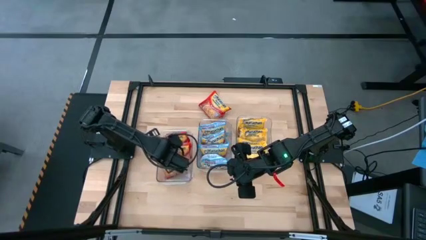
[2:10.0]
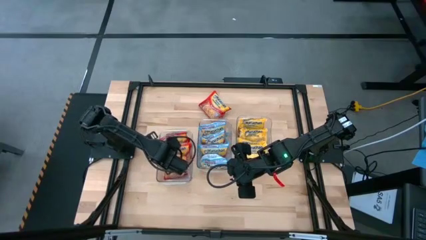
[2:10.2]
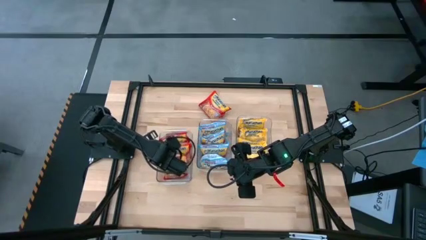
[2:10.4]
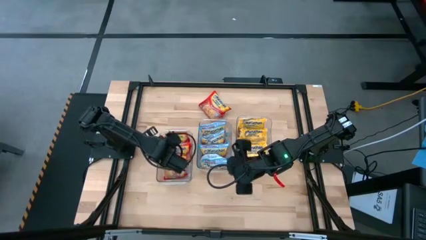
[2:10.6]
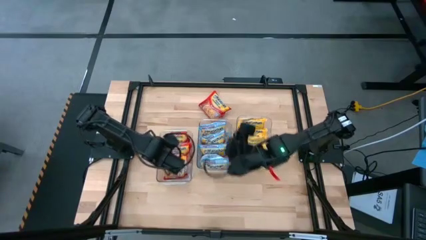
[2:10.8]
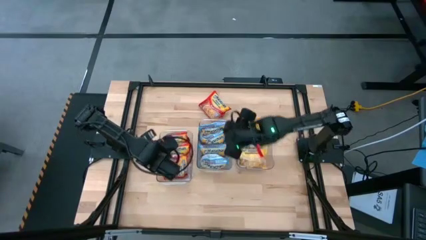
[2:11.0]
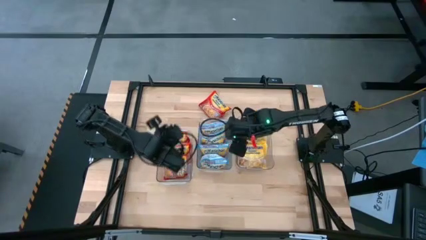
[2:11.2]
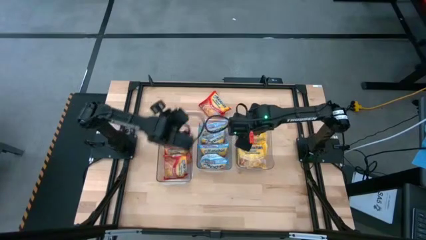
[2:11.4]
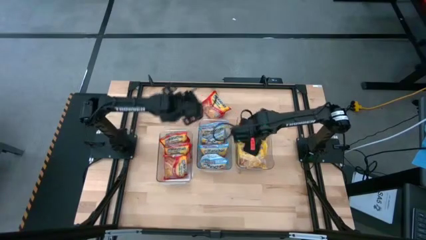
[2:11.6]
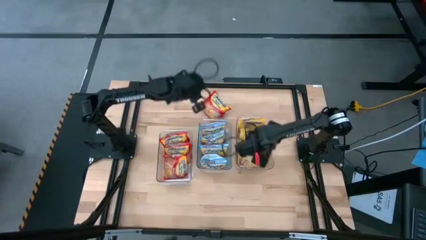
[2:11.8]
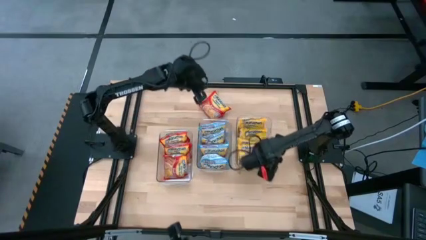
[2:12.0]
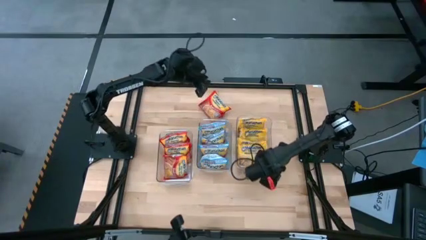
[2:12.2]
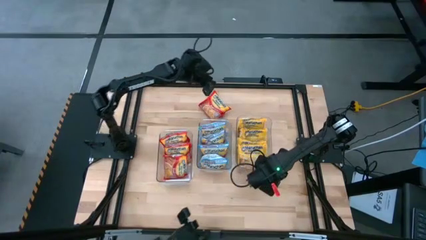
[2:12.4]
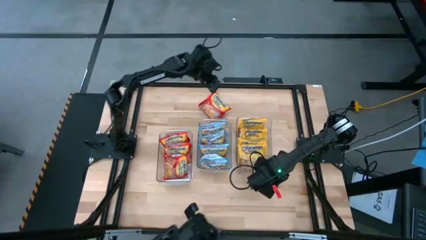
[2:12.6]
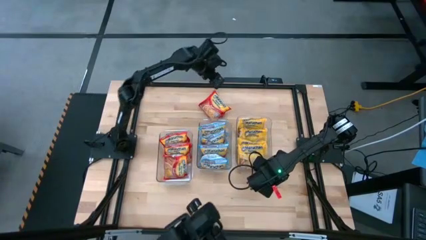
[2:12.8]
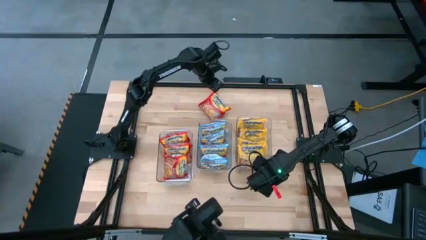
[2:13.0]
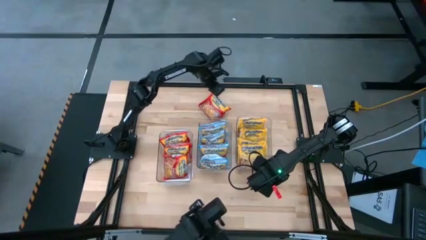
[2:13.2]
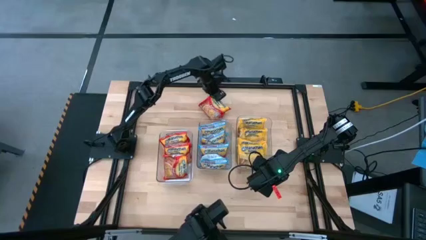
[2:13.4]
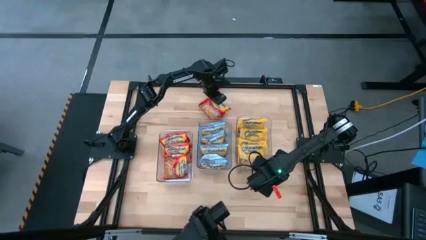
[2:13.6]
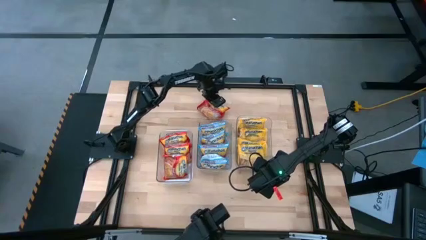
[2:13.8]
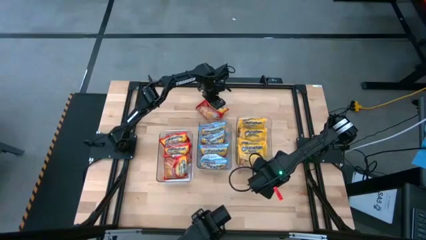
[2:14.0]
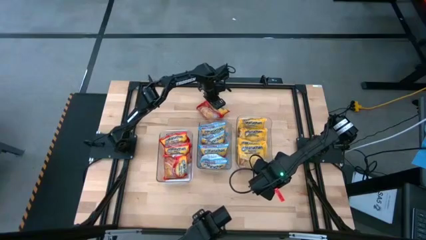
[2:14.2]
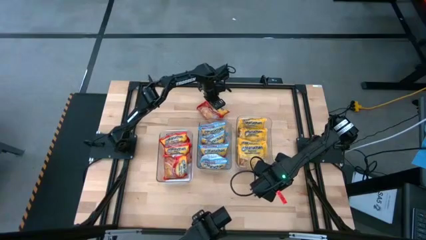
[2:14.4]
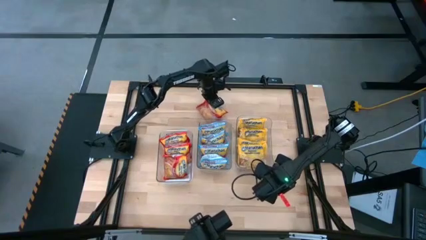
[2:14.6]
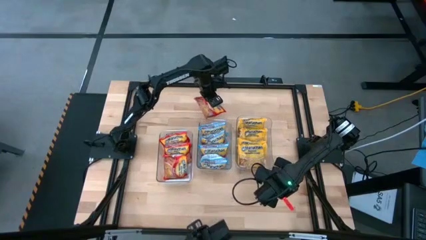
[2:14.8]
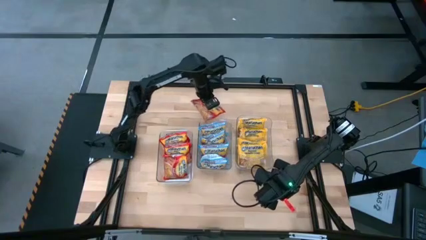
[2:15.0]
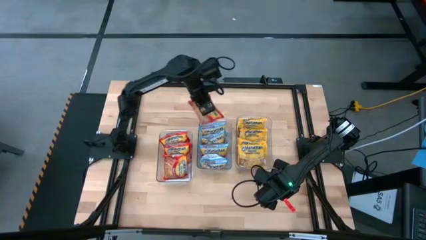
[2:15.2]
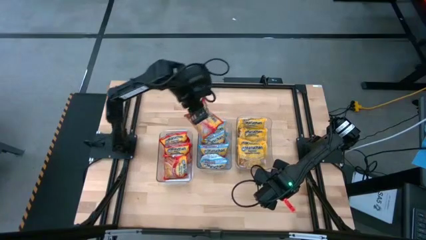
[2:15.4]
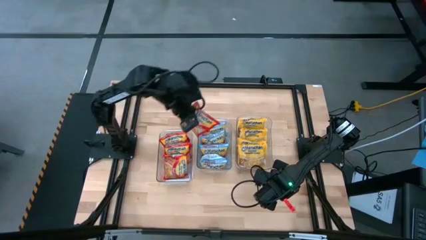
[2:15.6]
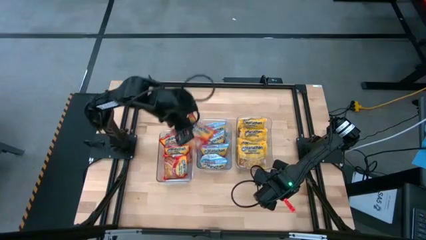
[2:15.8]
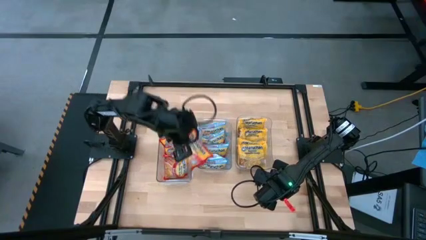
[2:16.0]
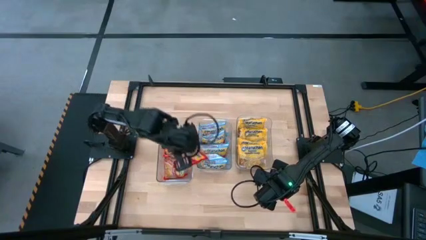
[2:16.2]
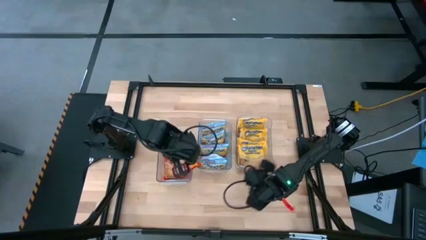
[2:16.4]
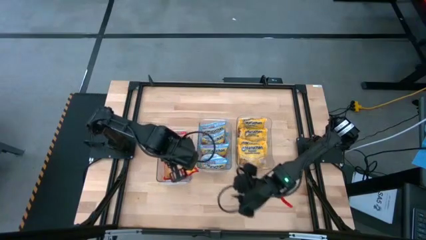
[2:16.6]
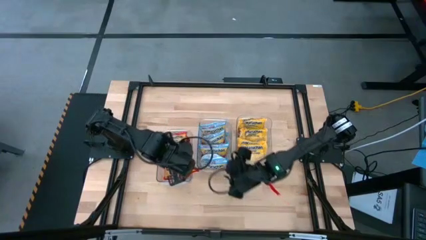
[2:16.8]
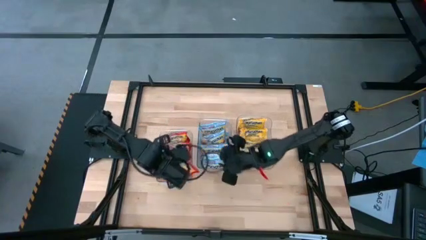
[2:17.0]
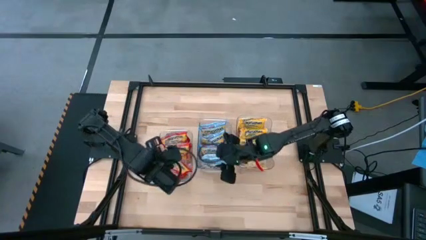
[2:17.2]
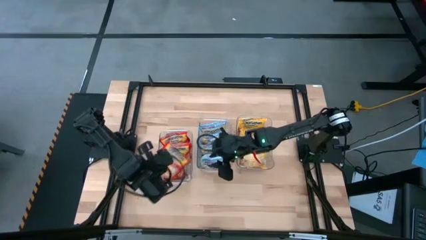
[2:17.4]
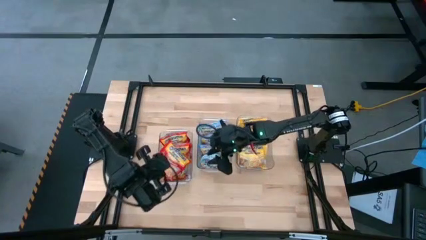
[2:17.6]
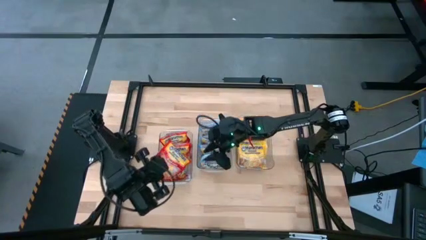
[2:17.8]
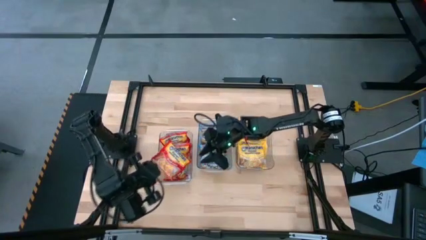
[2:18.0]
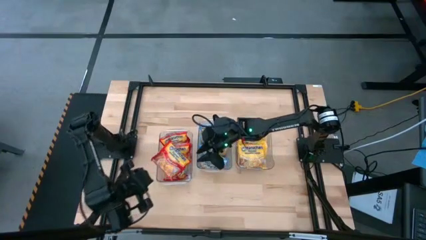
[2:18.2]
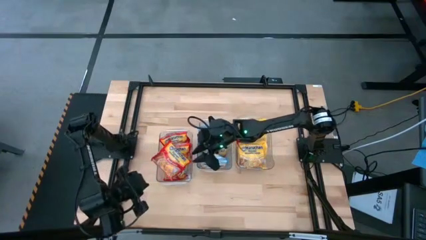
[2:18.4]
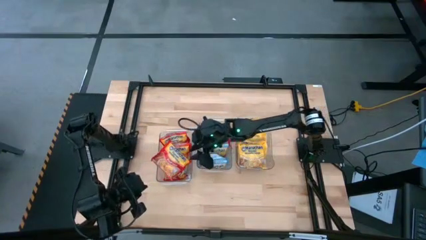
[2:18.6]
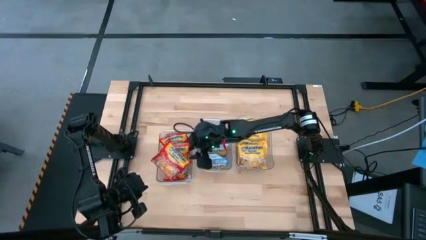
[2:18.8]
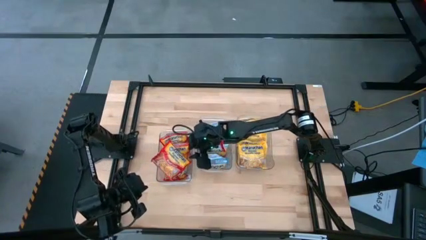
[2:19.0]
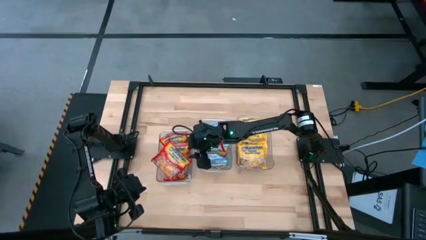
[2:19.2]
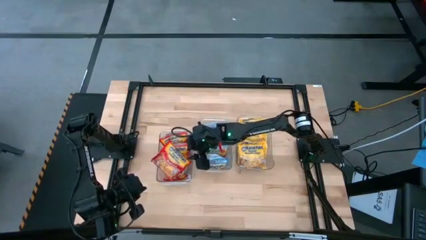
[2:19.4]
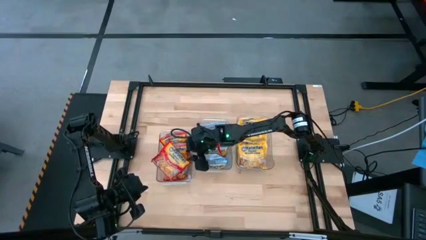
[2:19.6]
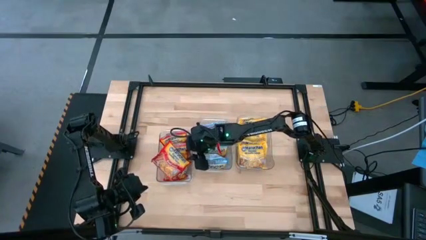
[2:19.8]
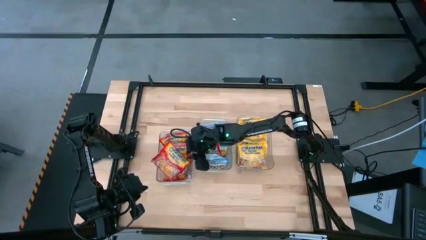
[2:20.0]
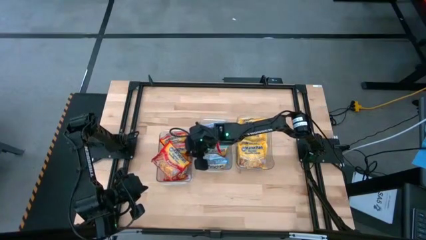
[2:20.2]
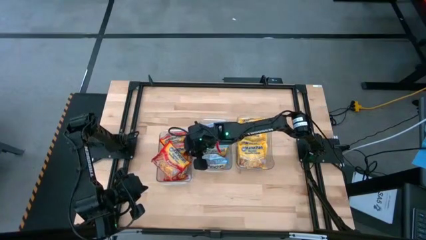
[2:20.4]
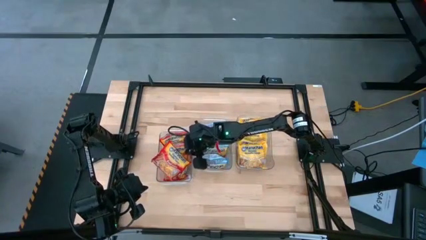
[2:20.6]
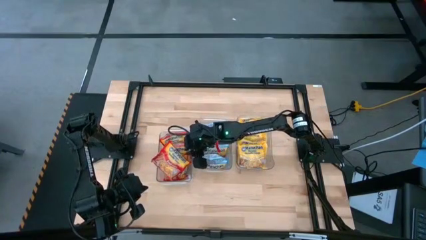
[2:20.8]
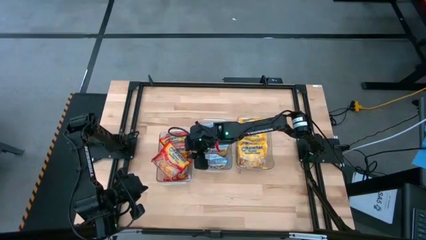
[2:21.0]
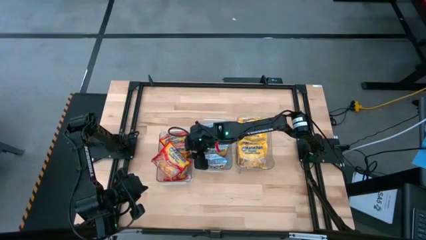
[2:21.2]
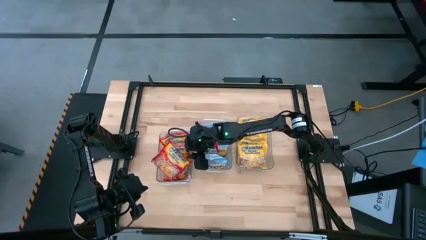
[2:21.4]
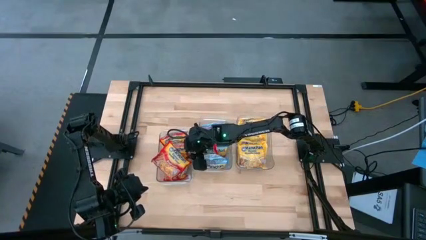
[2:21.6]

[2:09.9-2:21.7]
Task: Sort Maruchan noodles
Put the red noodle pack into the left transparent bin

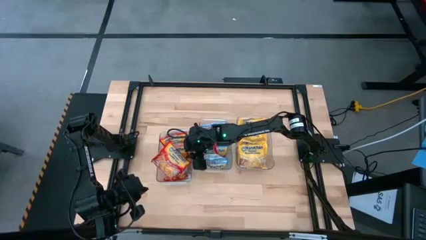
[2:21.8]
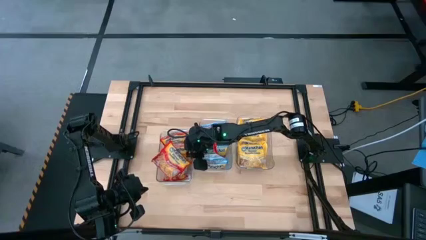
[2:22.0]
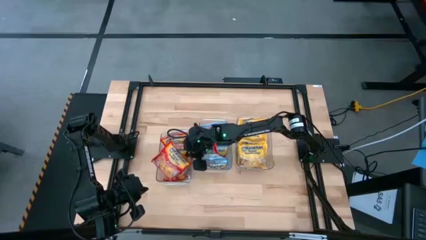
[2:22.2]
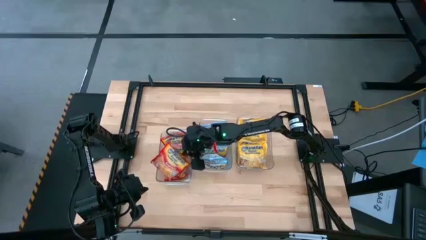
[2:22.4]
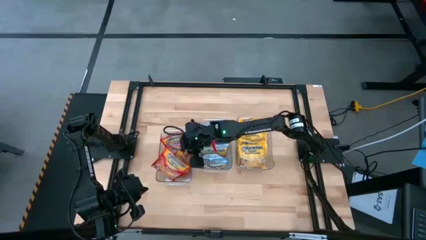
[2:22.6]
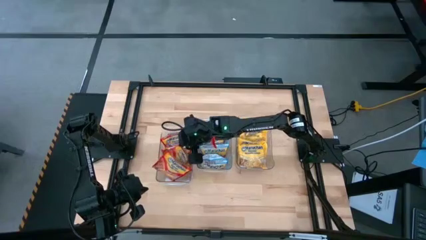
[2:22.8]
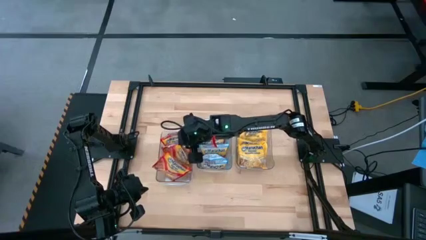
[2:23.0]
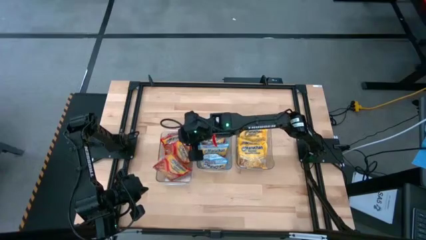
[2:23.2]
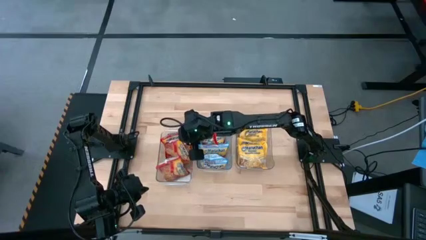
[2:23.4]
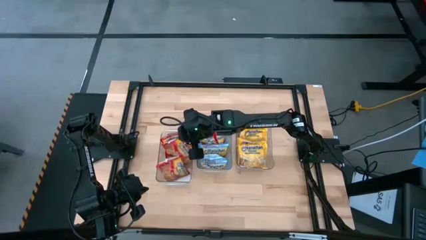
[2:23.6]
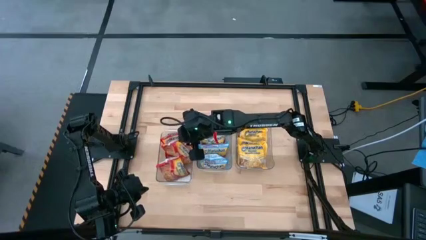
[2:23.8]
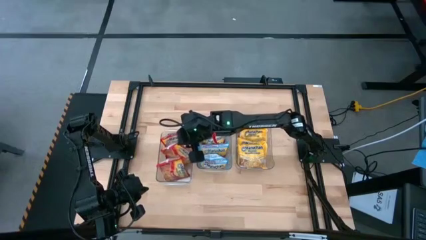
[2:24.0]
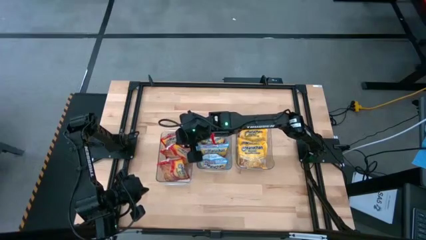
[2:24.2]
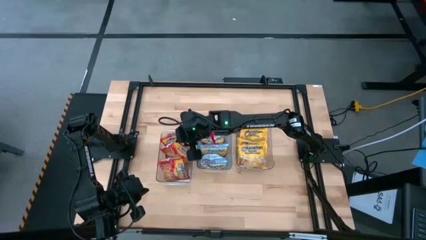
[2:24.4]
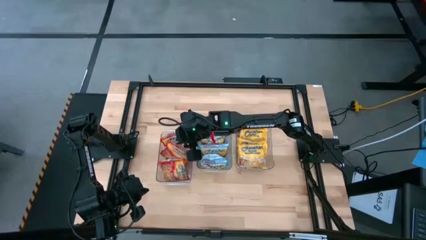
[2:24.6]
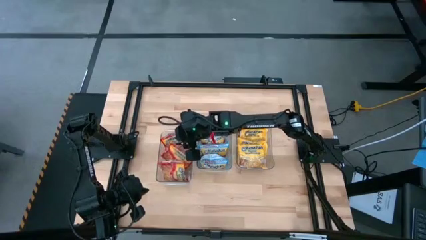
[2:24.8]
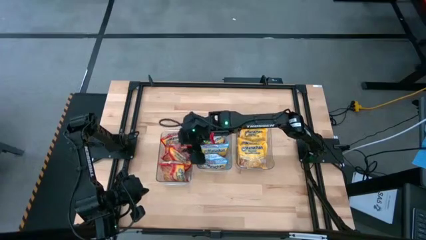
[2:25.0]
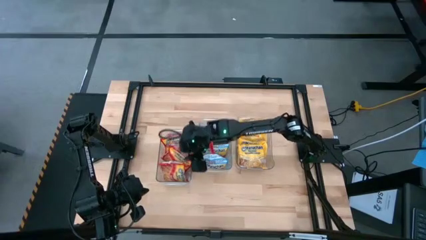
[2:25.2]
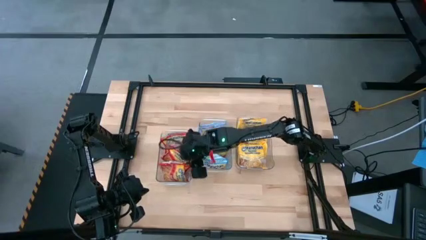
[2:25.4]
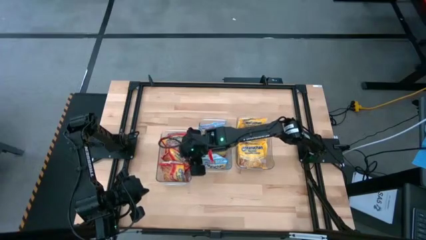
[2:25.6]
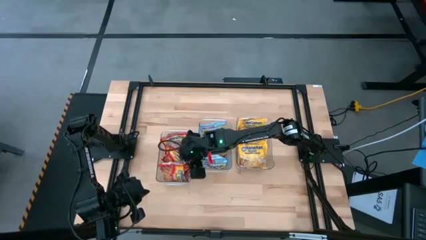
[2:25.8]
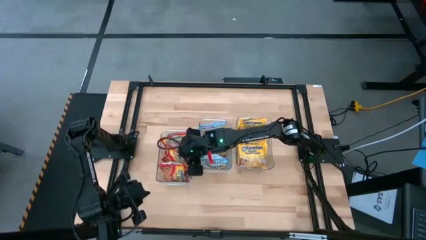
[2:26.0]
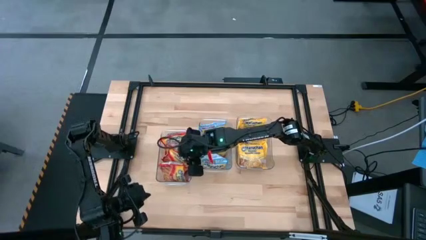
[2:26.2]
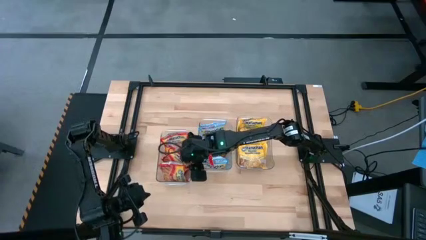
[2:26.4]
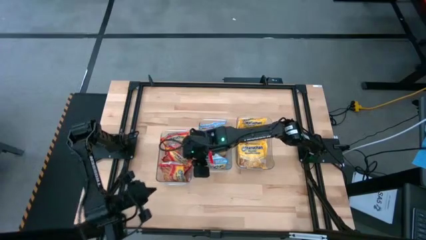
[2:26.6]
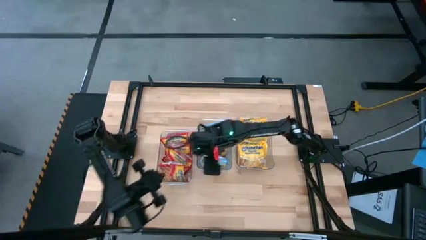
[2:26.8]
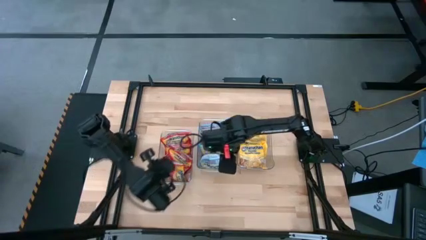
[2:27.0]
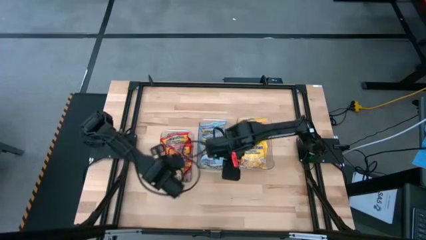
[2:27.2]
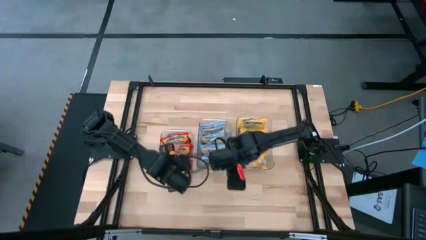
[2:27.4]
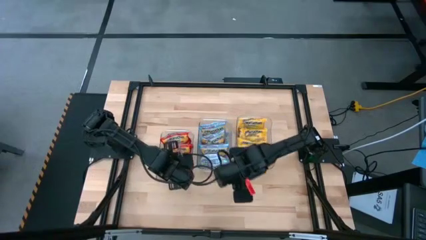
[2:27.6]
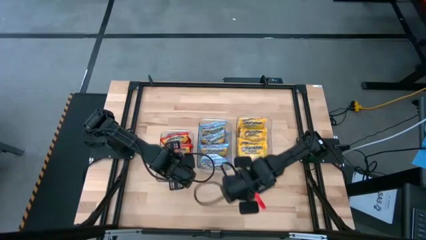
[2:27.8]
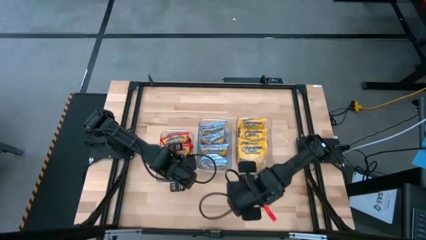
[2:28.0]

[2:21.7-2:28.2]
Adjust the red noodle pack
